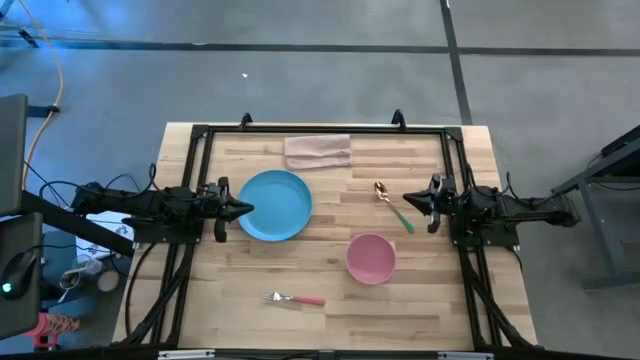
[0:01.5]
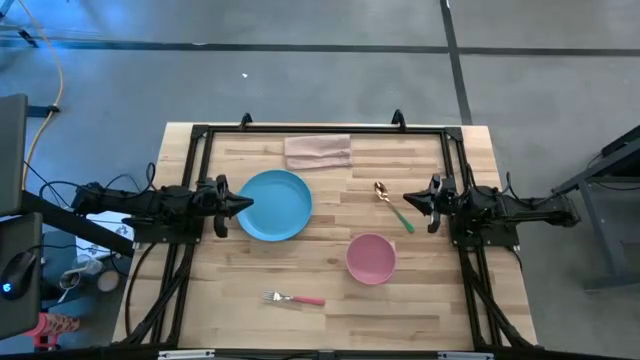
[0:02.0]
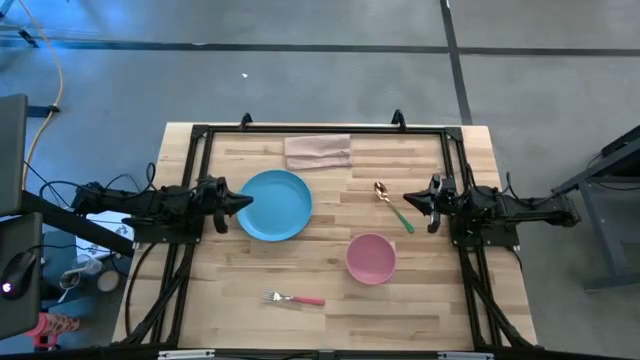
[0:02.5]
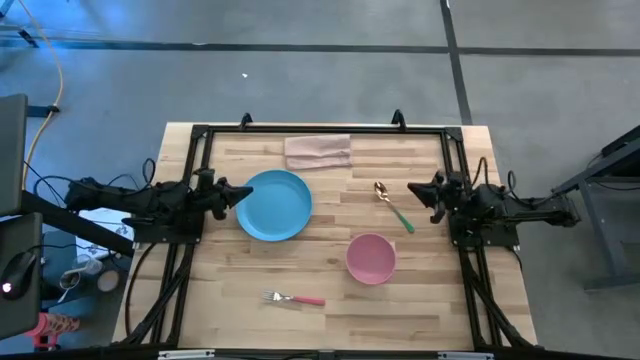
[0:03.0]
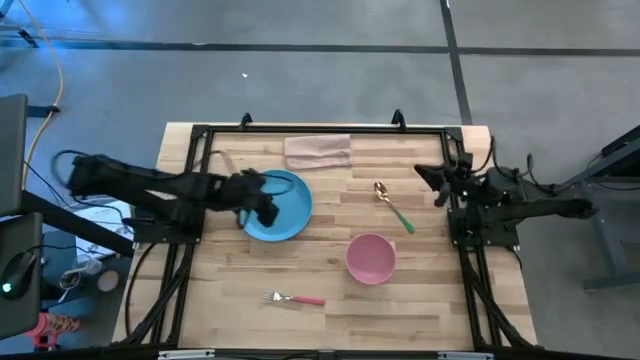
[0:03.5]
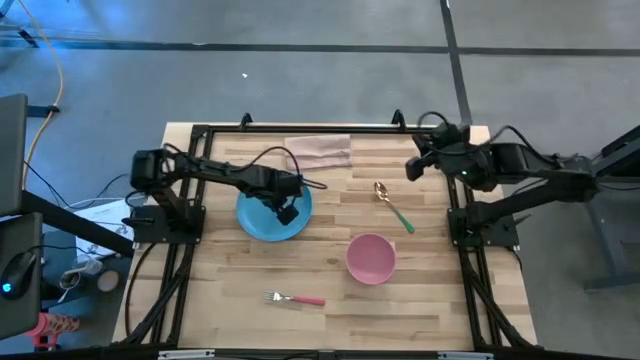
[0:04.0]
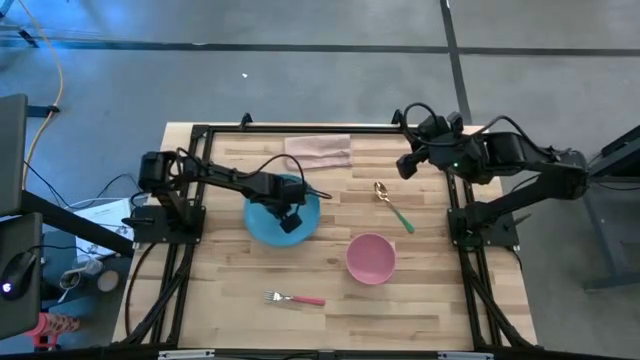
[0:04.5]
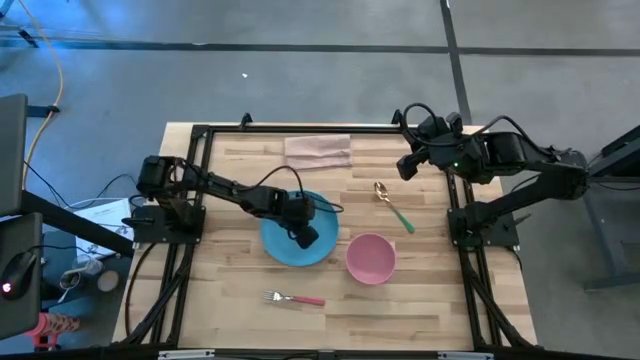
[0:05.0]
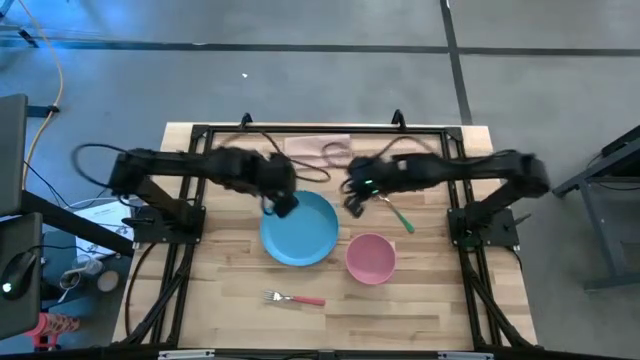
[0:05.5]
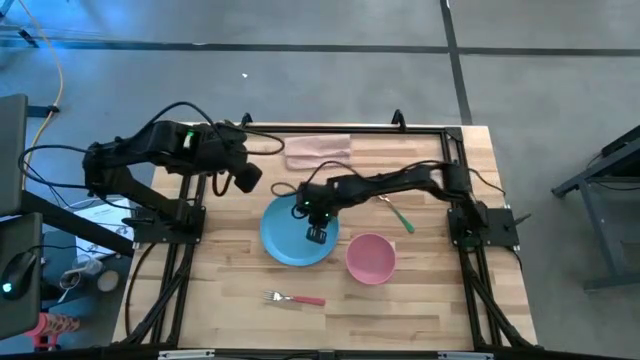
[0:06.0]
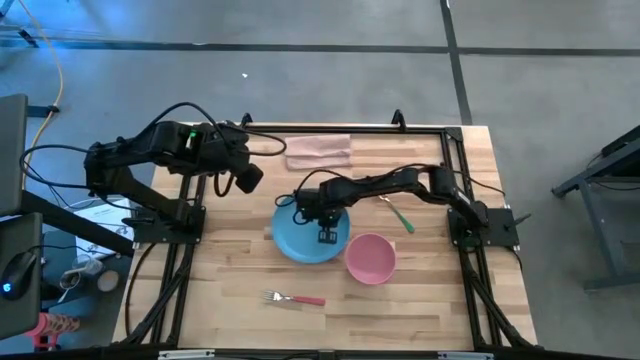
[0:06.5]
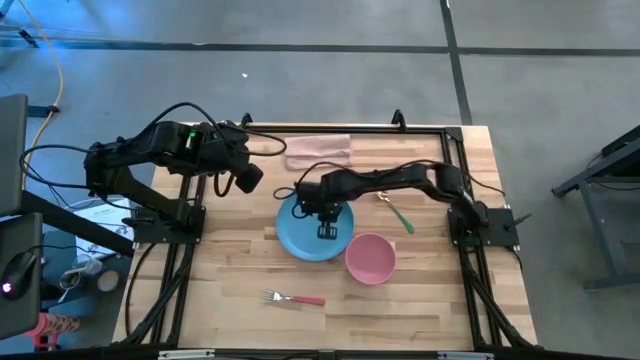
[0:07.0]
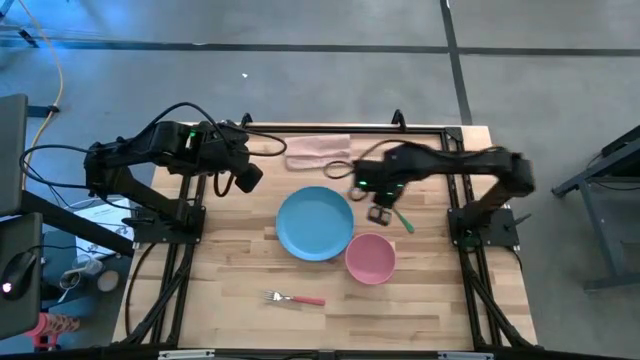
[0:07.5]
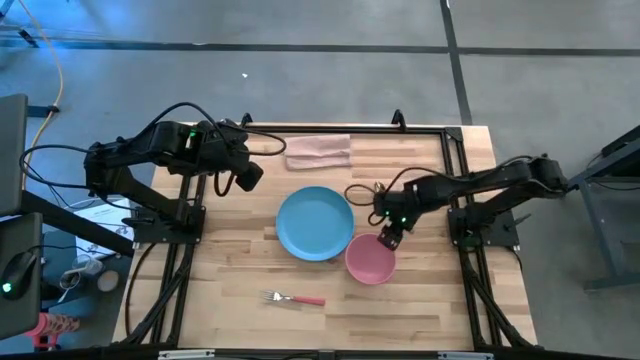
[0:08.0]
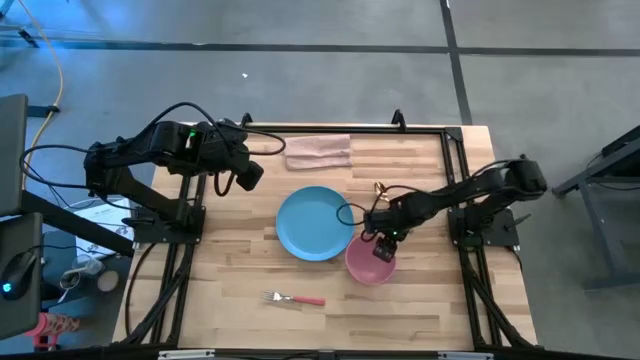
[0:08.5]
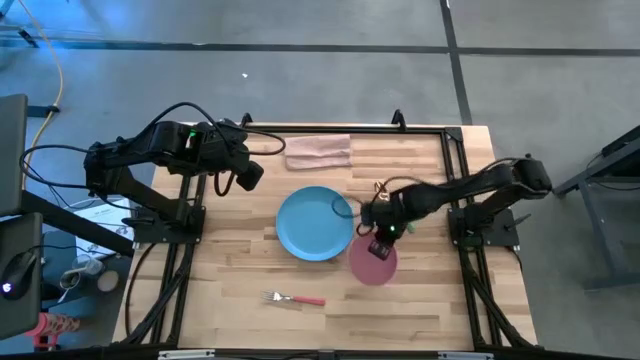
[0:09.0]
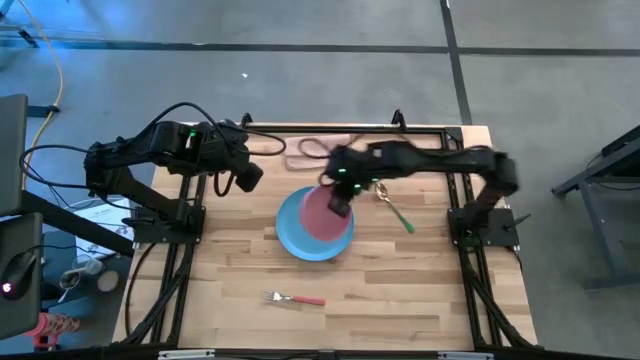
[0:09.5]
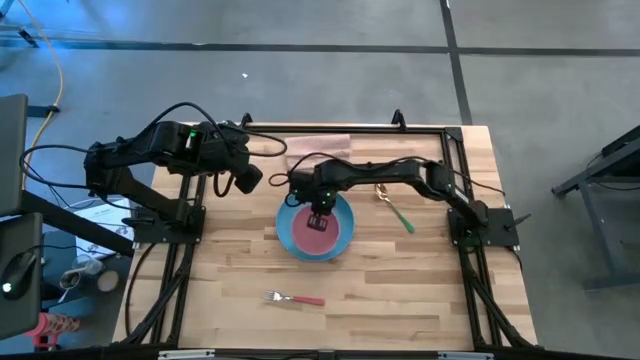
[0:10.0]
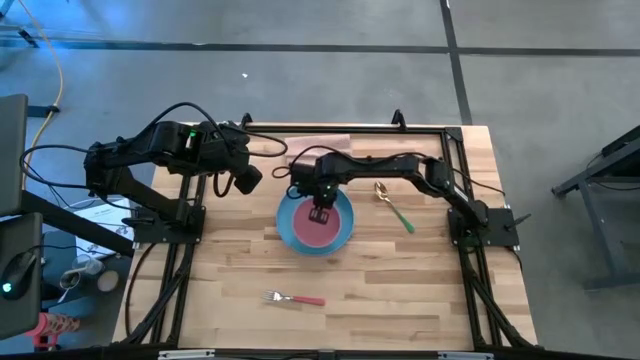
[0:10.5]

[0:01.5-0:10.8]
Task: Set table place
Stack the bowl on top of the plate on the table

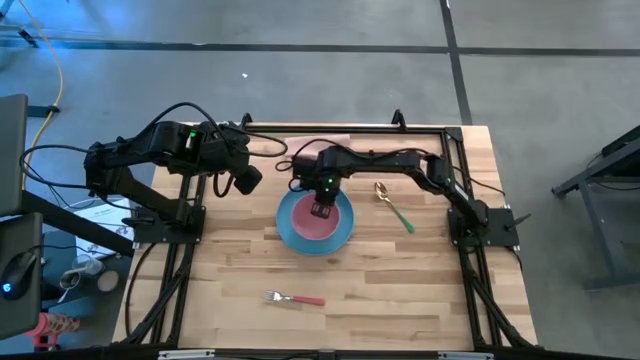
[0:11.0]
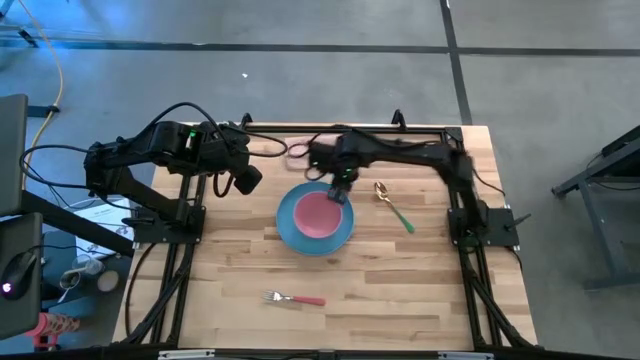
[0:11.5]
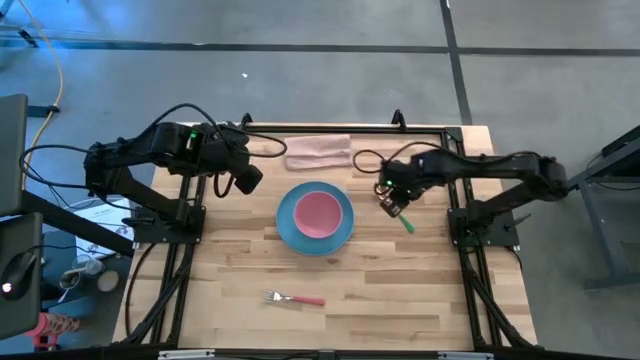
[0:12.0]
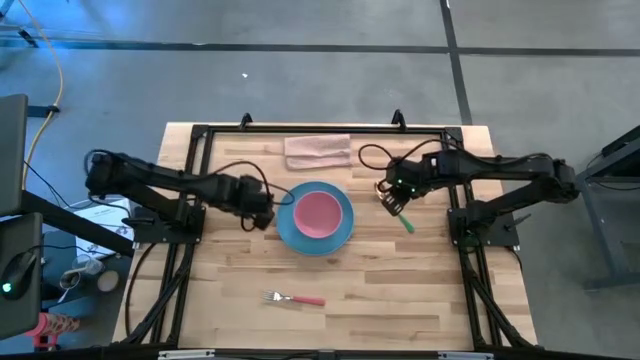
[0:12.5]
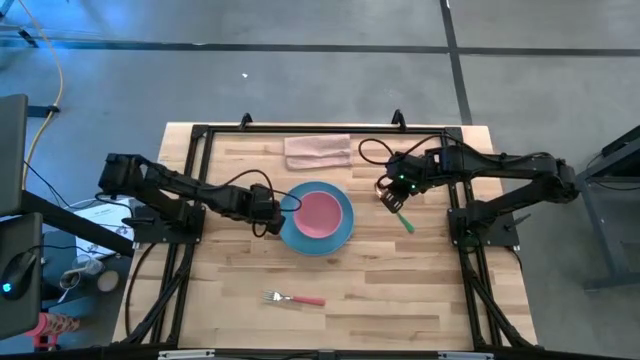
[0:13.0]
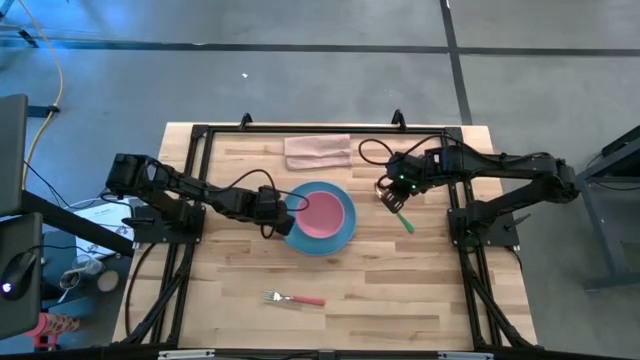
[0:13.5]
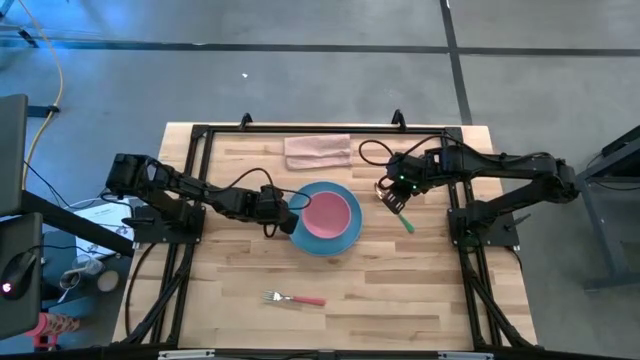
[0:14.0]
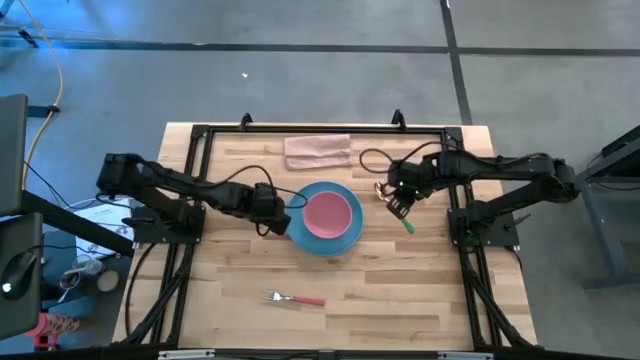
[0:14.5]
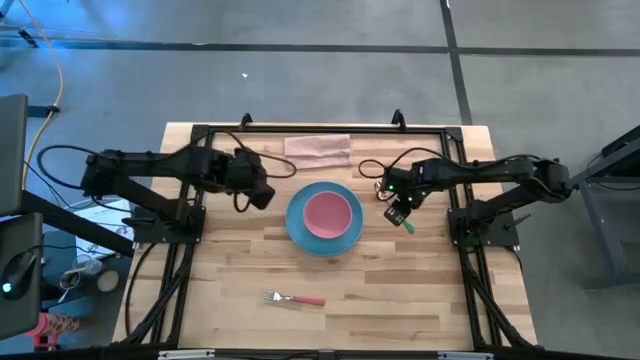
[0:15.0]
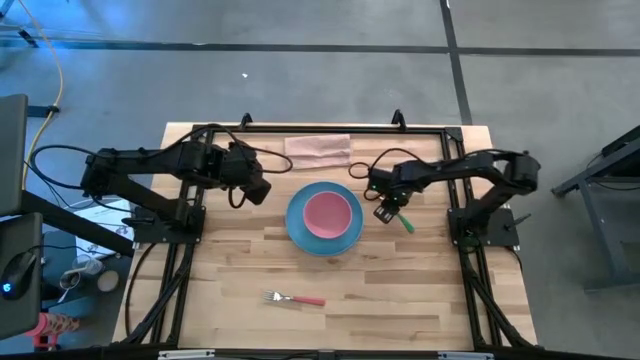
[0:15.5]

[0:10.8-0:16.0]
Adjust the plate

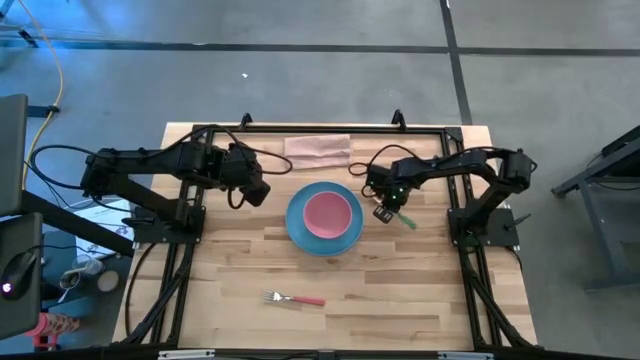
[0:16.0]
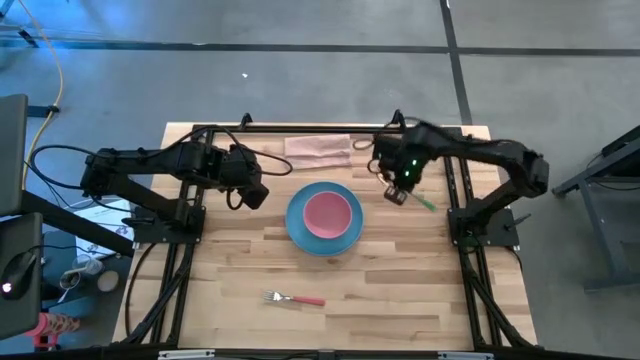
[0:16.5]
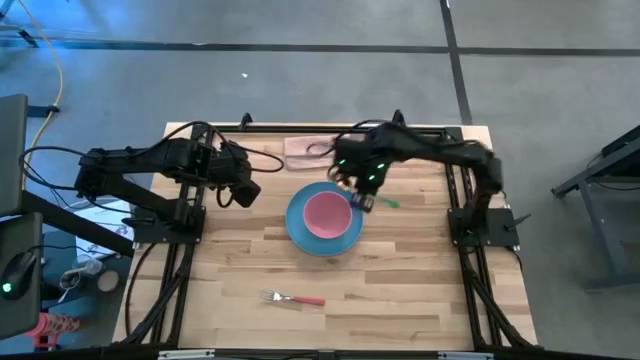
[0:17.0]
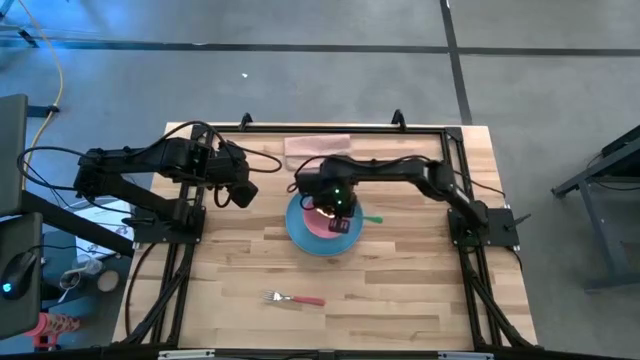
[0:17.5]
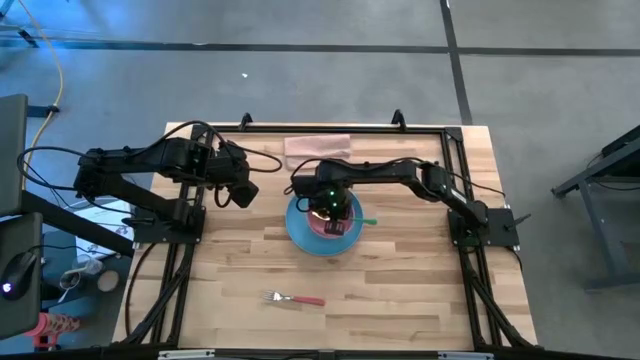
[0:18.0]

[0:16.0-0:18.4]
Put the spoon into the bowl

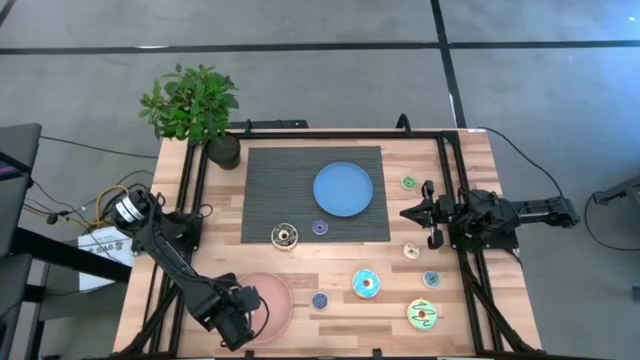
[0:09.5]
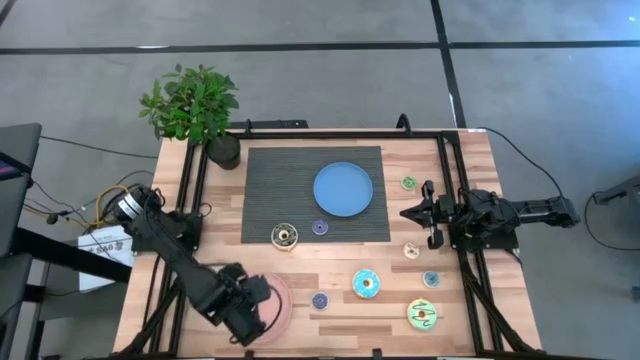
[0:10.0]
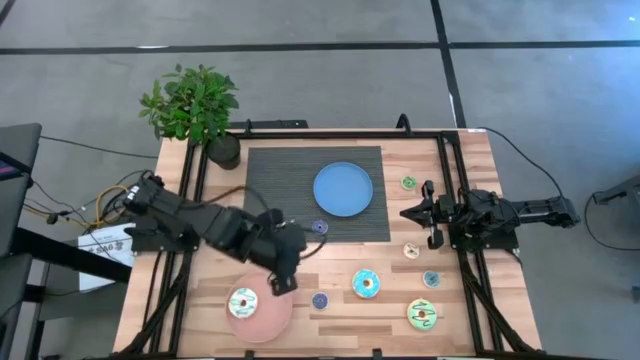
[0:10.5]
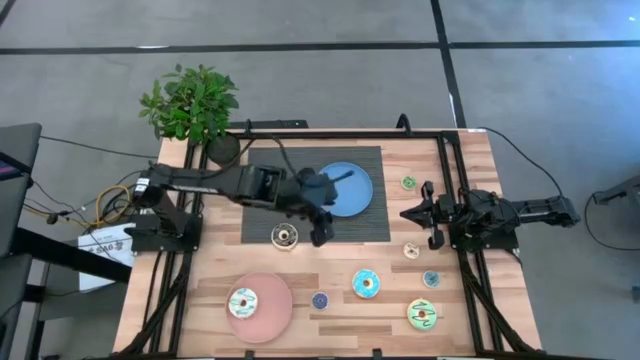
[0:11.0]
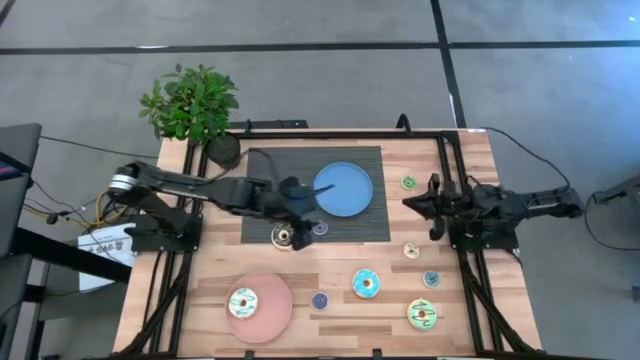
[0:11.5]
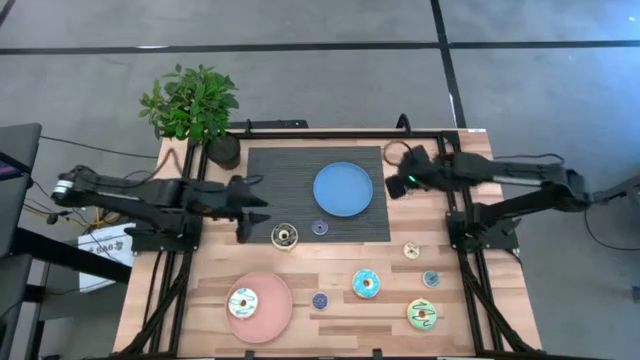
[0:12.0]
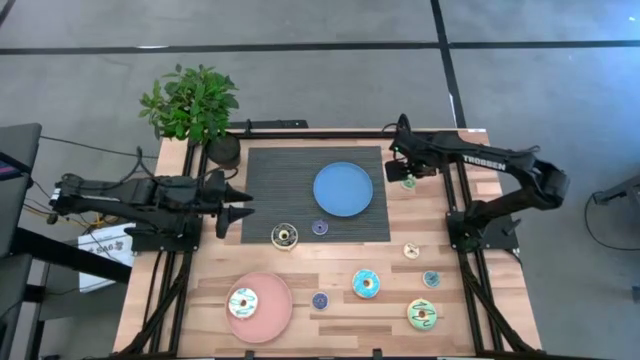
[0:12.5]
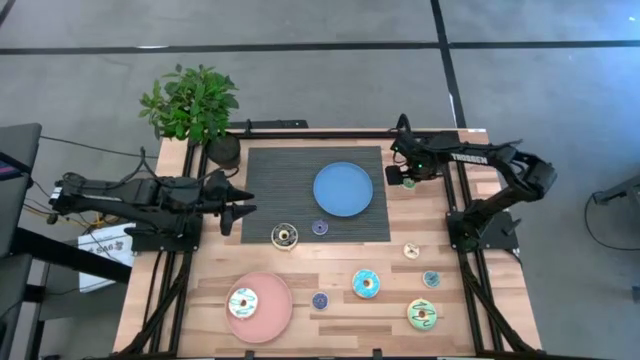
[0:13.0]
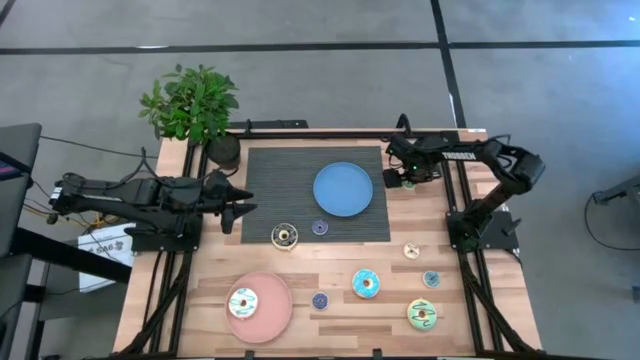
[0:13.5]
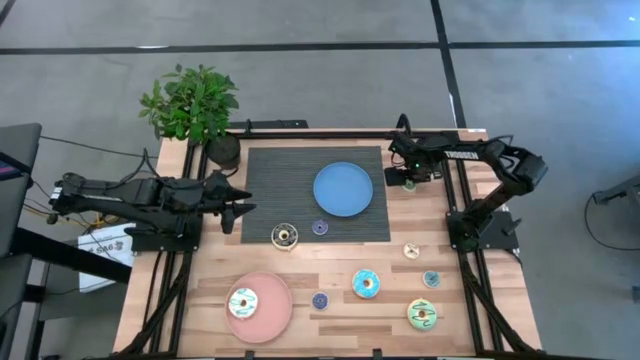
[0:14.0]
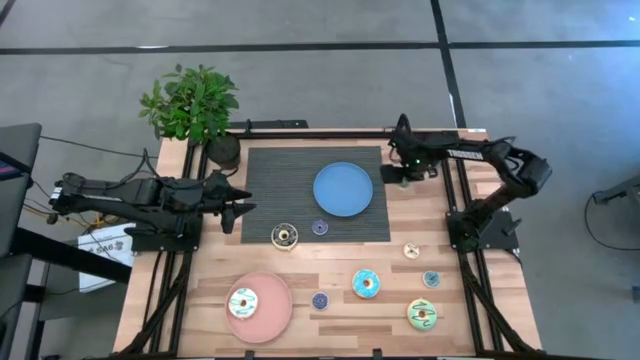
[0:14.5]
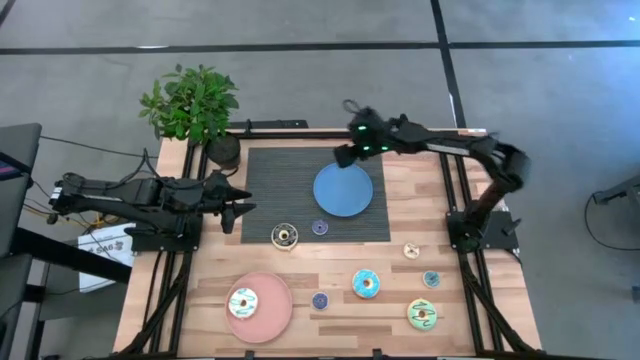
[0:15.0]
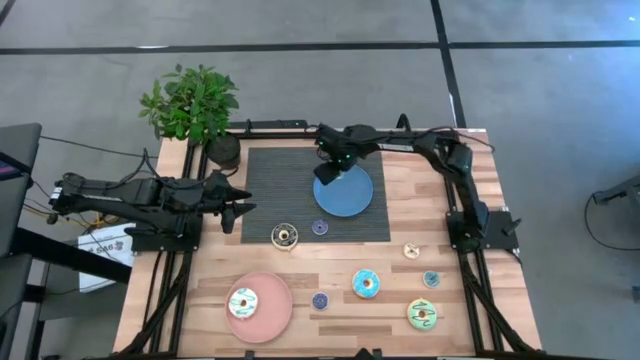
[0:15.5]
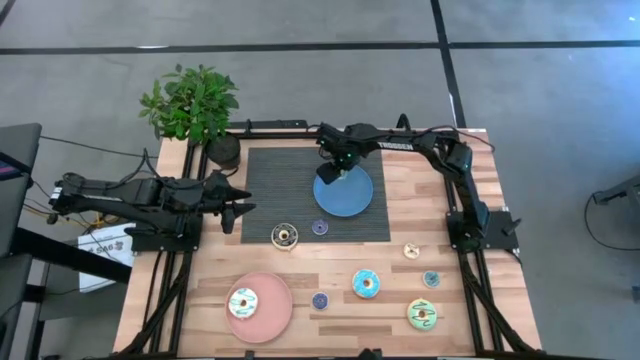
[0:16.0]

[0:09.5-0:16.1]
Task: Pick & Place donuts
Put the small green donut on the blue plate
